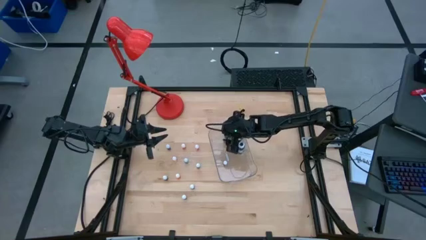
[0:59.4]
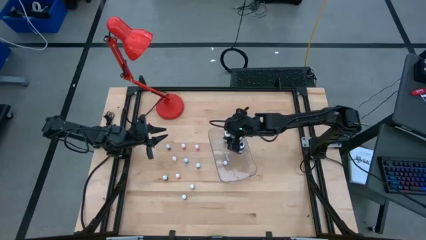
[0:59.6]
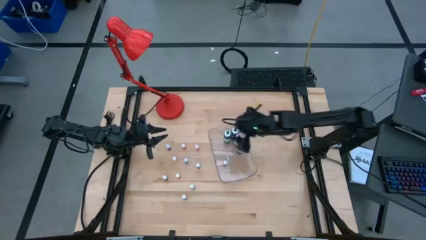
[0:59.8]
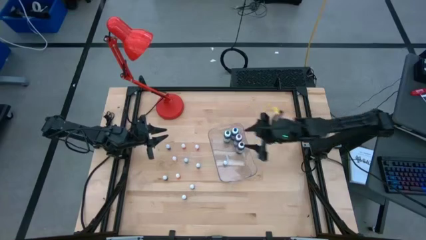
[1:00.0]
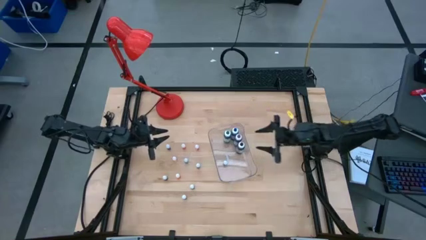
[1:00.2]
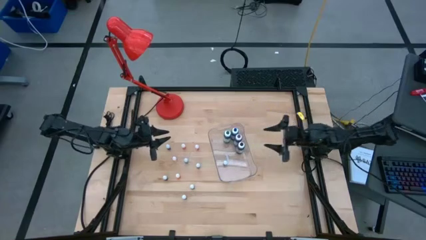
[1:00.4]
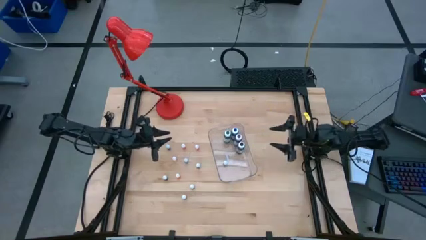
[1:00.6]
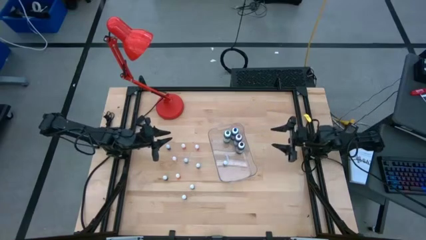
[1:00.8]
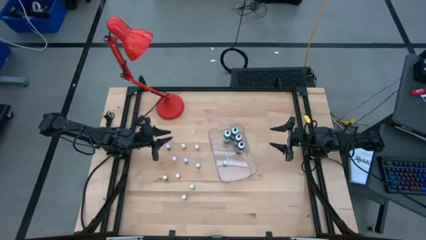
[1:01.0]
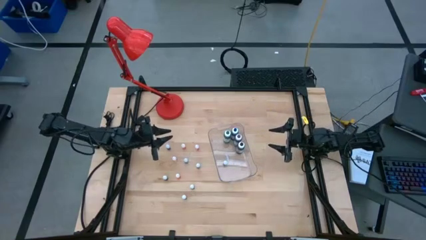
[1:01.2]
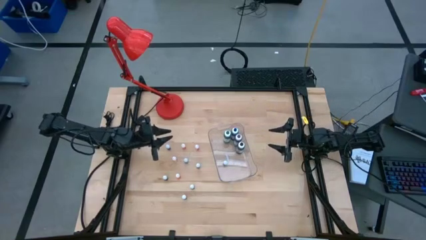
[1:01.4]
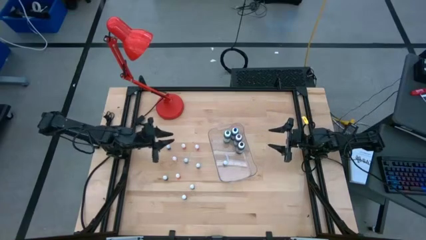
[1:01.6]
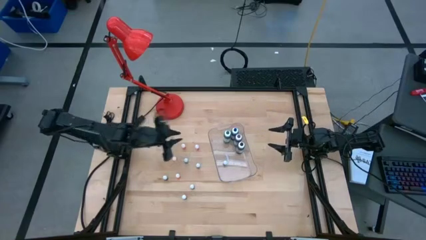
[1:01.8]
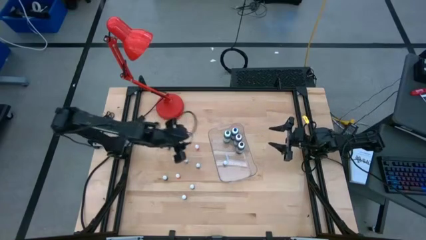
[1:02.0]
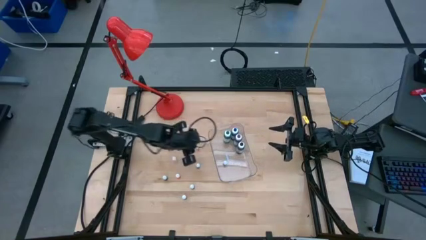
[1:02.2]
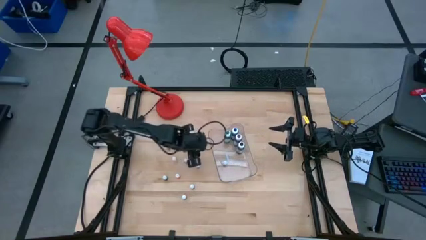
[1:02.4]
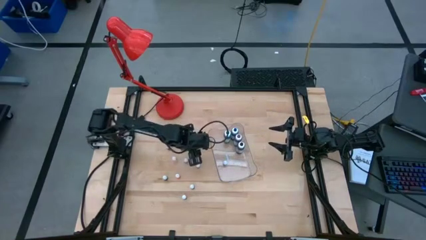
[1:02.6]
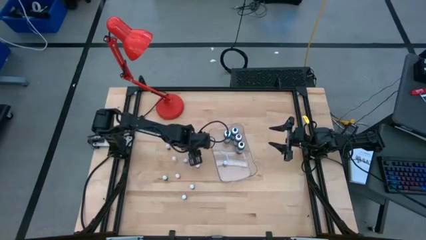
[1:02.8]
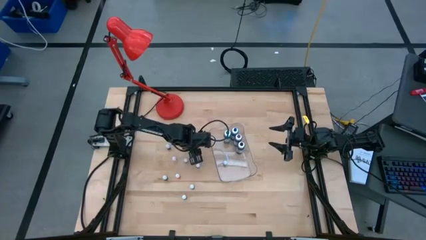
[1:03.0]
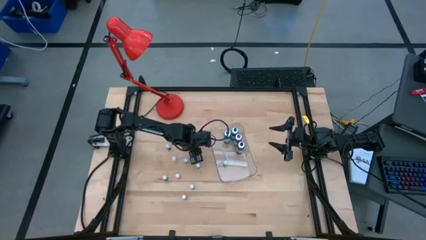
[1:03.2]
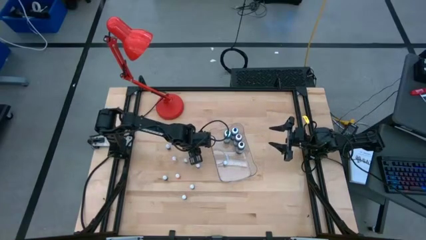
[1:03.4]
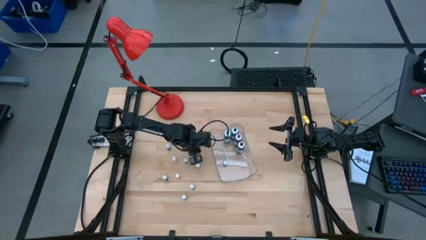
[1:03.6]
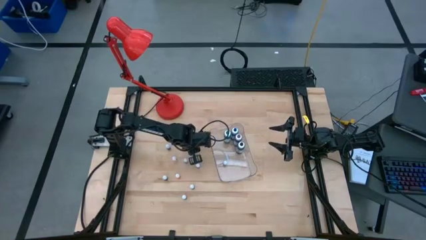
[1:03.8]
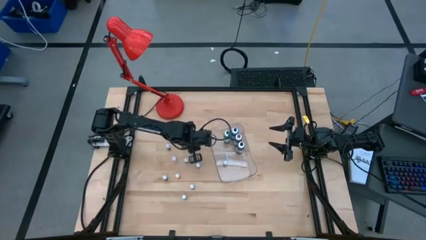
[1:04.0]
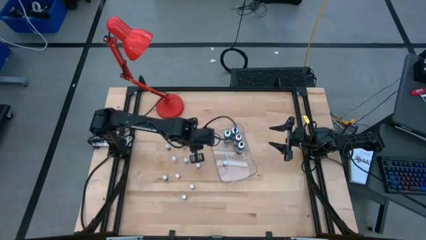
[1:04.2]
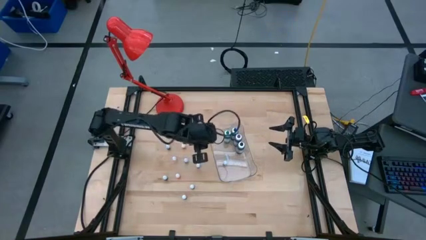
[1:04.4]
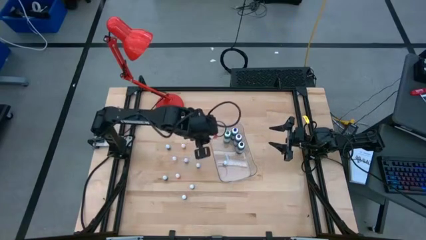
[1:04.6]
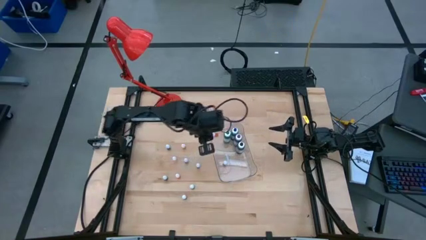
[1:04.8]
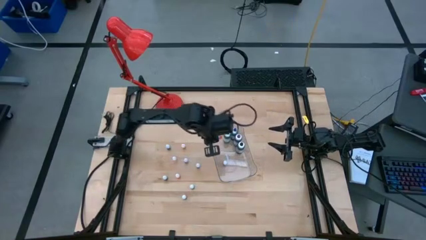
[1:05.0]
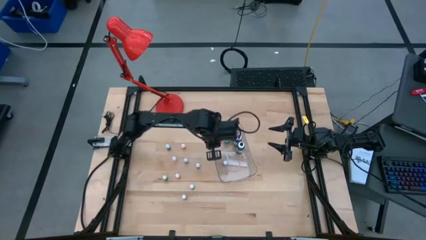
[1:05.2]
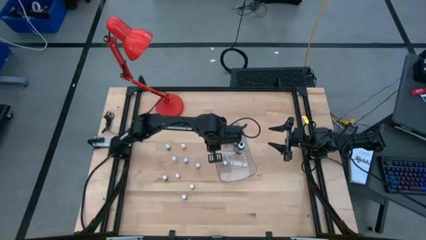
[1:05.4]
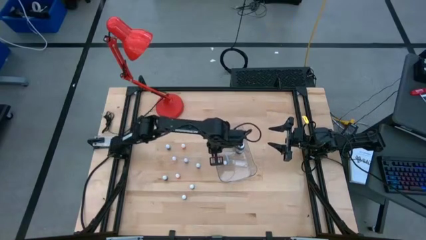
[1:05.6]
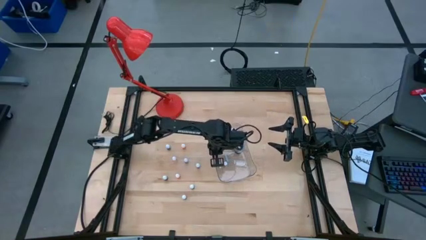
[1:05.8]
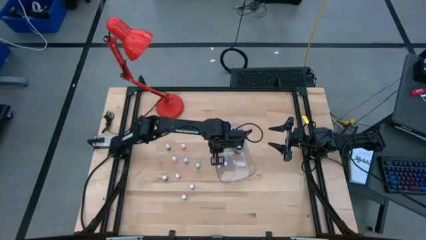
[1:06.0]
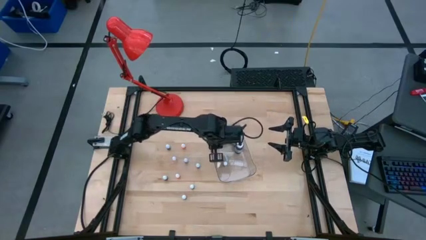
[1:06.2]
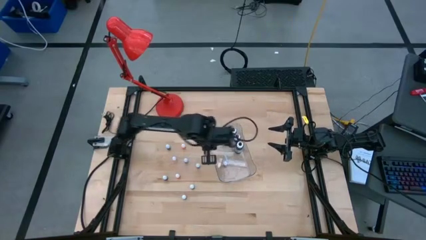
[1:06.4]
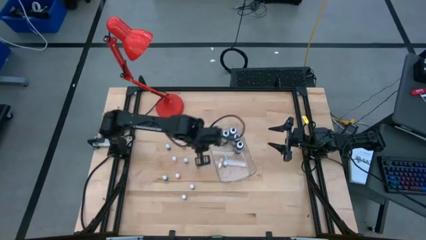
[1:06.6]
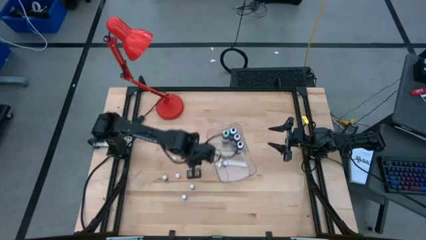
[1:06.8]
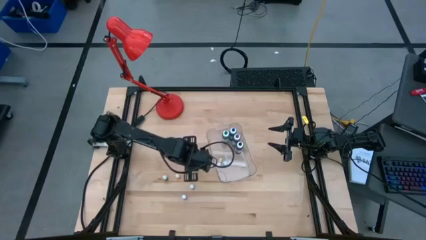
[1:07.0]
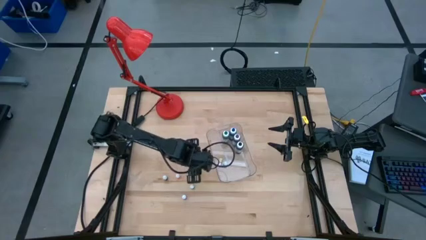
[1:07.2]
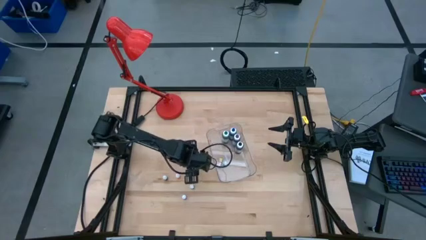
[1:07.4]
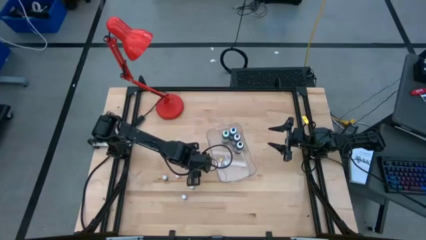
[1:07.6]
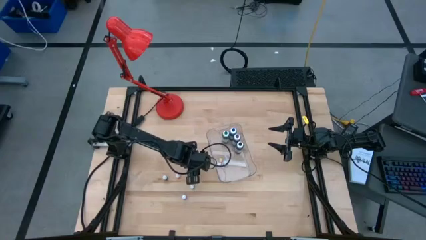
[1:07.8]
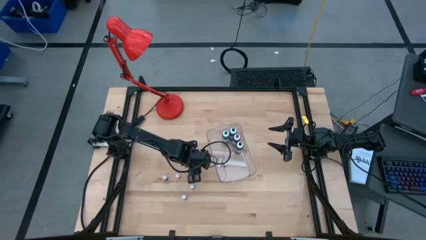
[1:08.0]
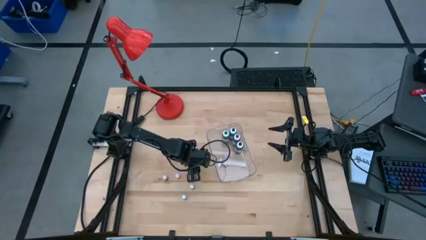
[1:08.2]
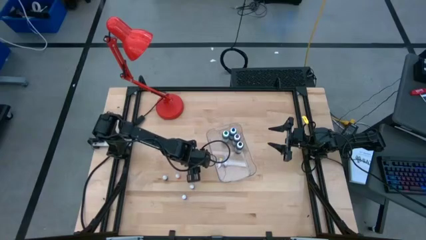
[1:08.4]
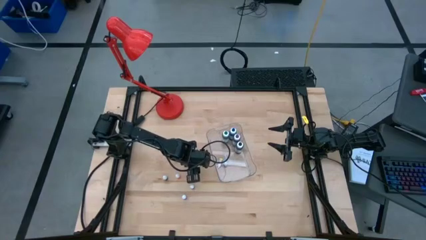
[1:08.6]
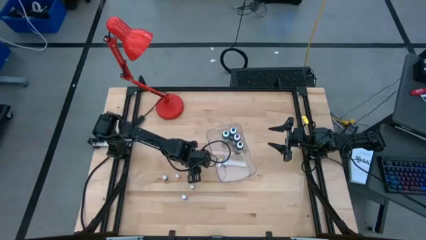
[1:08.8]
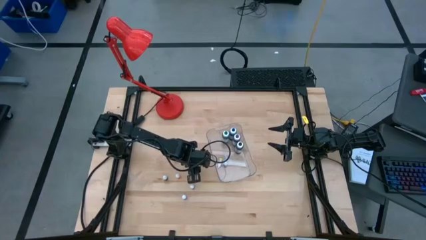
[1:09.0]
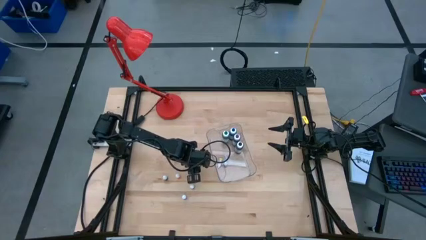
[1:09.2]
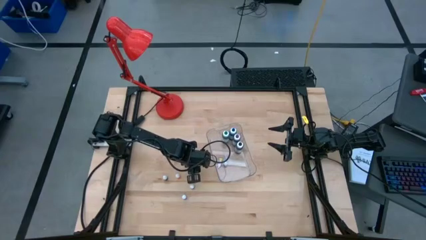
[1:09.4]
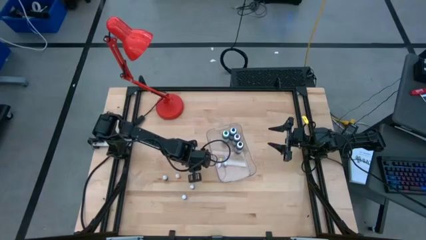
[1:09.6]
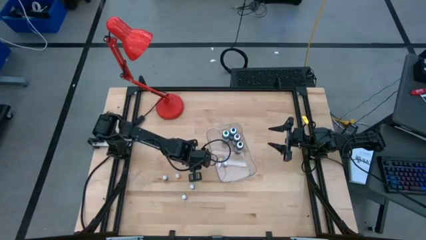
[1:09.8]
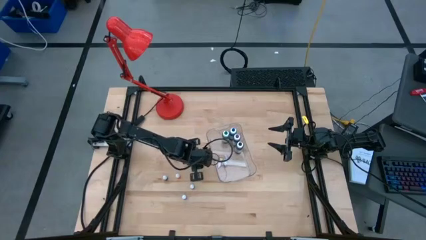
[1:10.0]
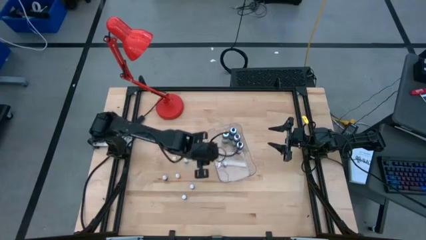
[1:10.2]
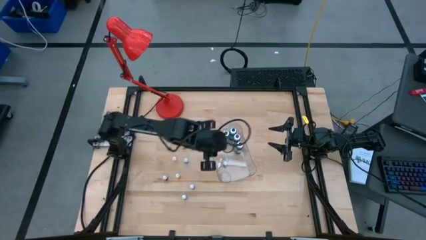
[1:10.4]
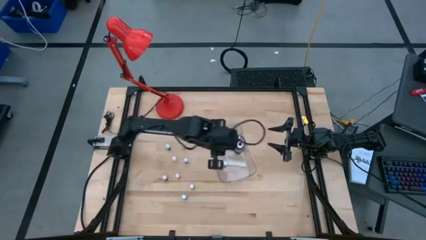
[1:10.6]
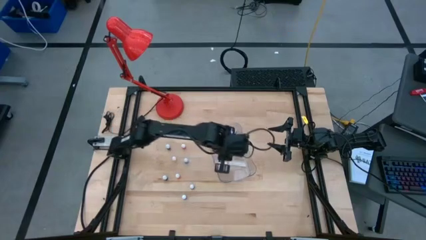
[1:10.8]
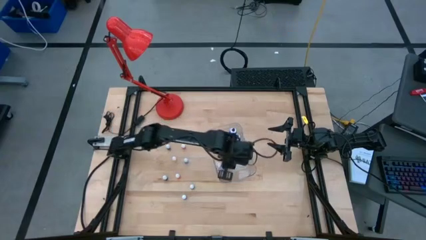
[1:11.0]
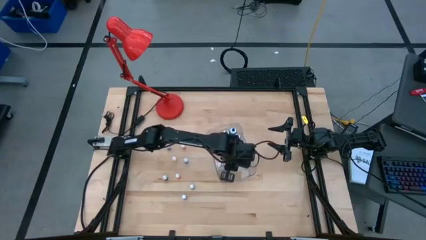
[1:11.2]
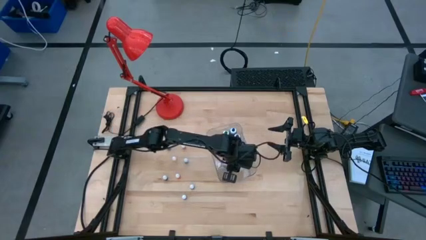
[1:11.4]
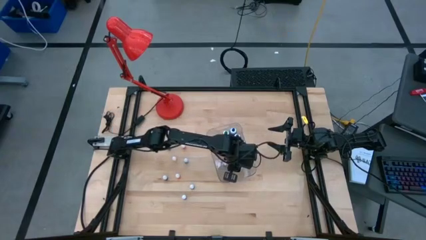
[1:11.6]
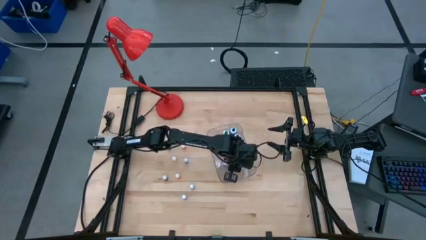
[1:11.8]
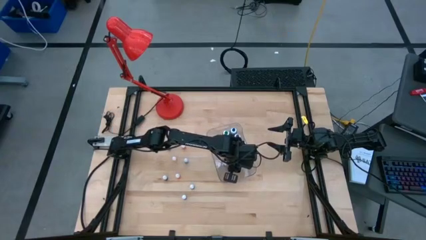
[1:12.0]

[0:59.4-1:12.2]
Task: Pick & Place food coloring
Put the black food coloring bottle into the transparent container

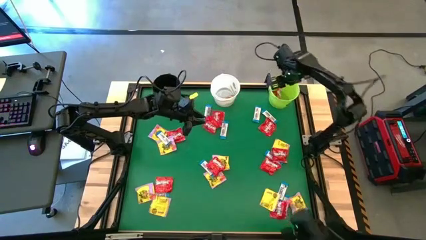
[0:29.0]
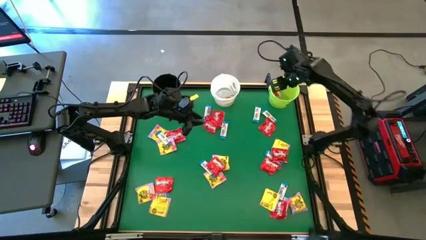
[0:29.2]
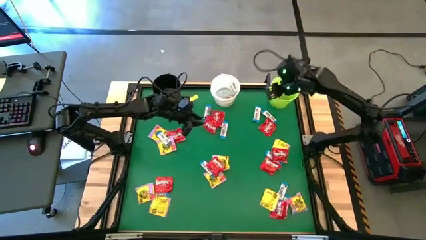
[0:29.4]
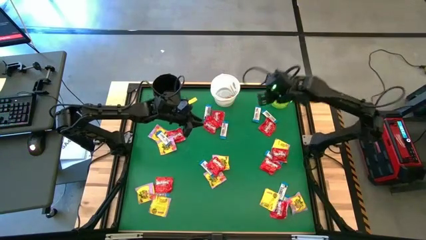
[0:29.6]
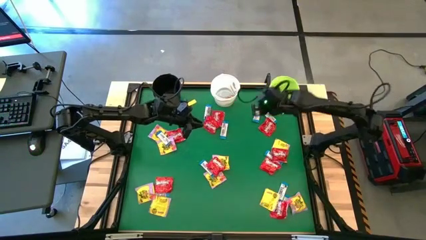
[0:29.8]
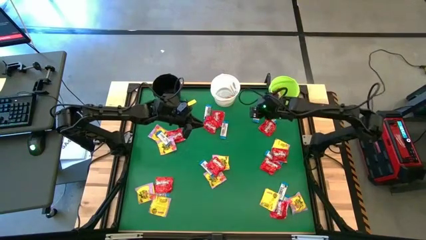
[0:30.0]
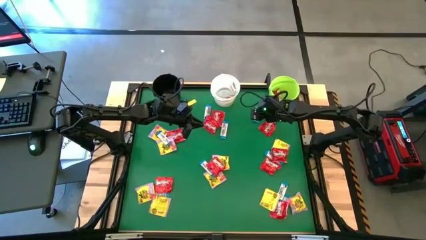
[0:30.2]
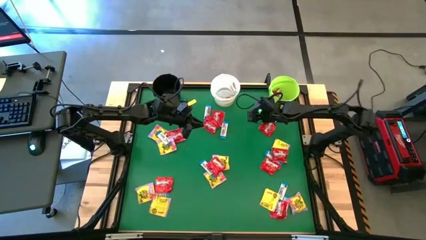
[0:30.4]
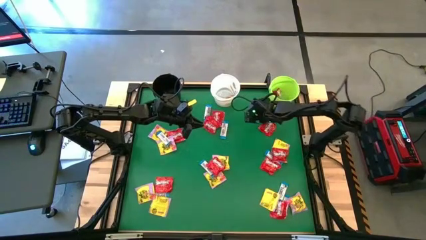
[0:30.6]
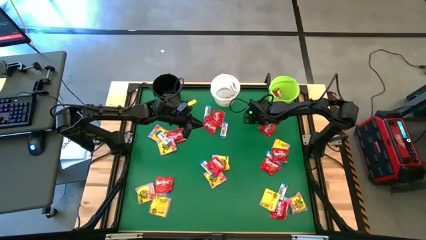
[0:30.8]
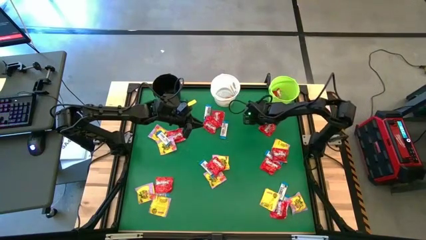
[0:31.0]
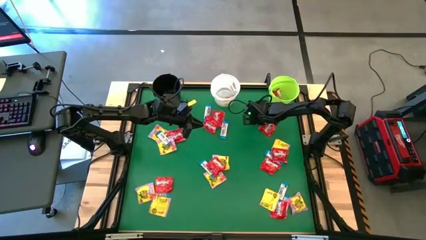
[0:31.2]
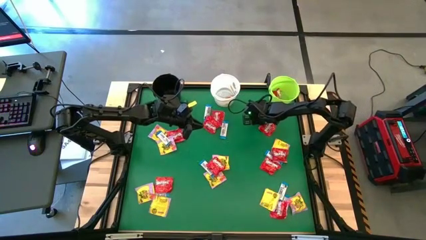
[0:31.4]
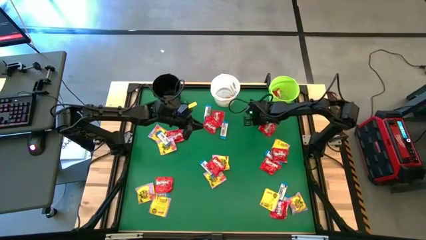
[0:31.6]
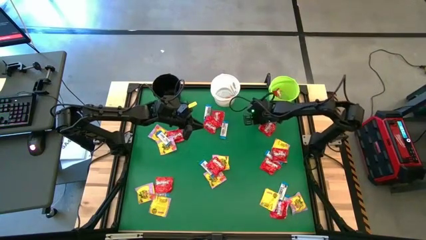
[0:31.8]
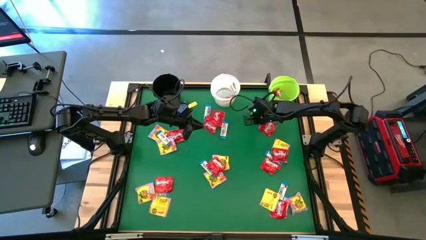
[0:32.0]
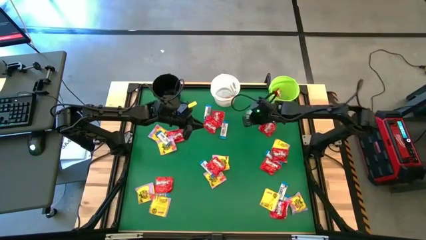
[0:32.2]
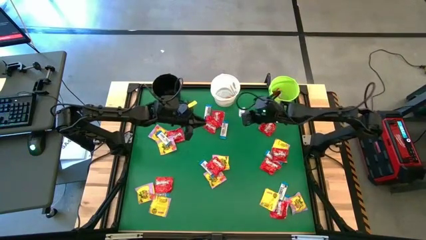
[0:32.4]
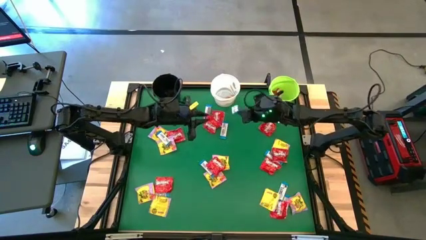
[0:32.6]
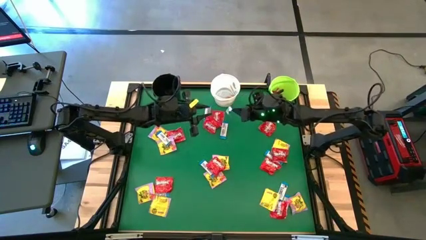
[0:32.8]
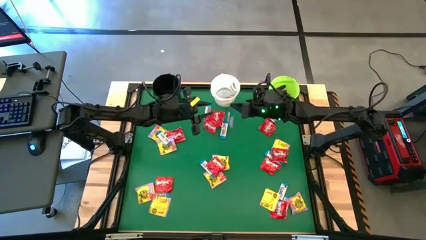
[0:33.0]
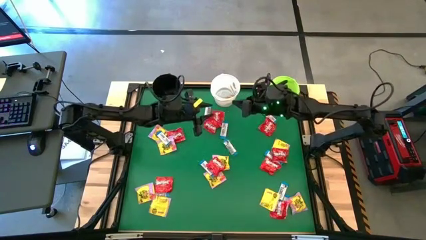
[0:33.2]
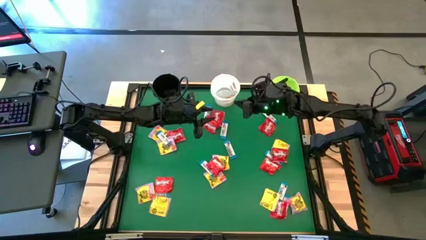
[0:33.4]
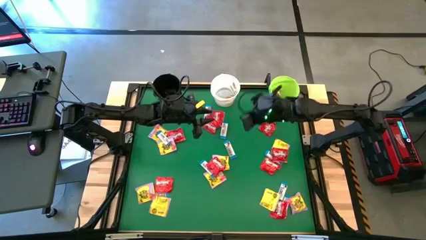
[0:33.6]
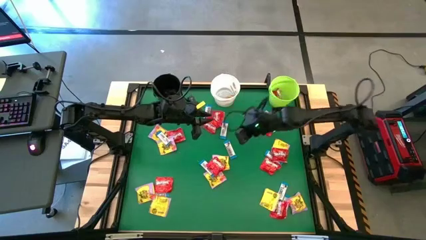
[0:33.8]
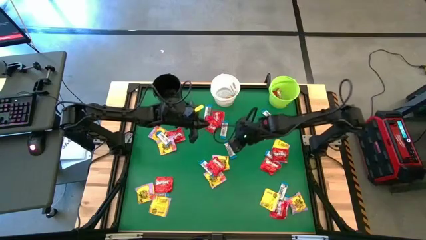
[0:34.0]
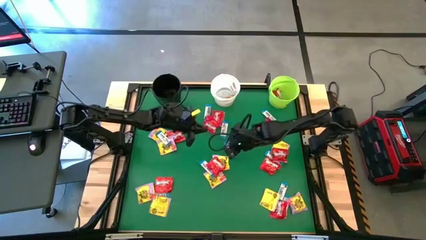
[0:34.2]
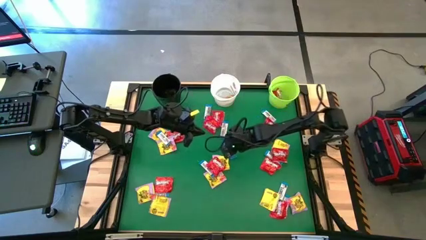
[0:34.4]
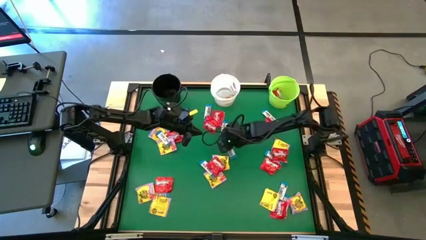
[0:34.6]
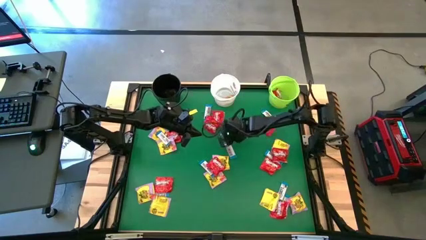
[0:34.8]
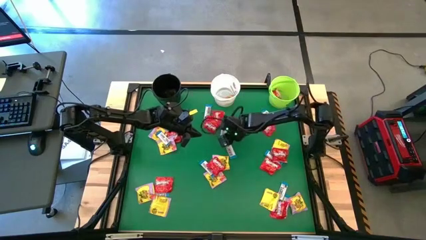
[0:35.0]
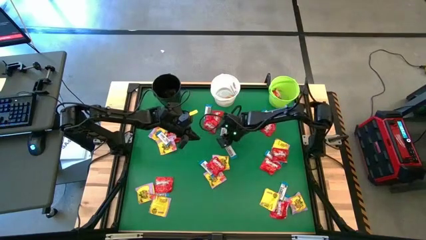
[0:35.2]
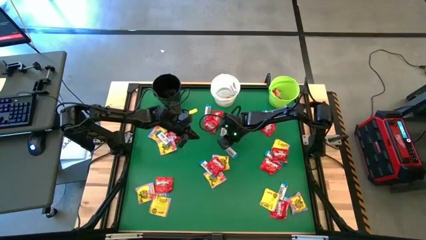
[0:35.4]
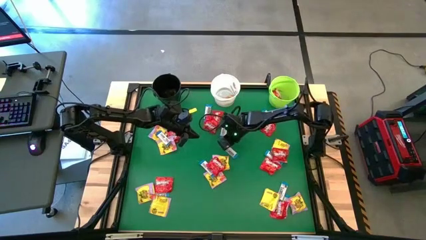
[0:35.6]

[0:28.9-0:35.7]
Task: Sort candy by brand, put in halloween buckets
Put the white candy into the black bucket
